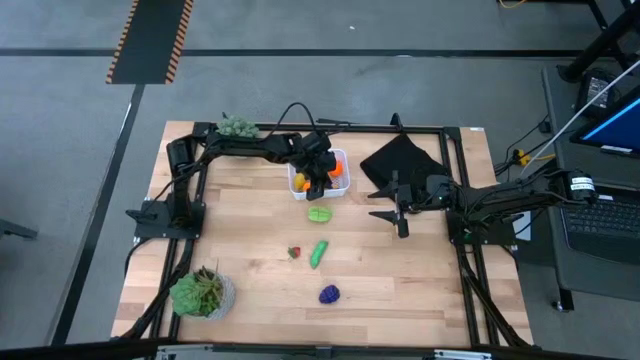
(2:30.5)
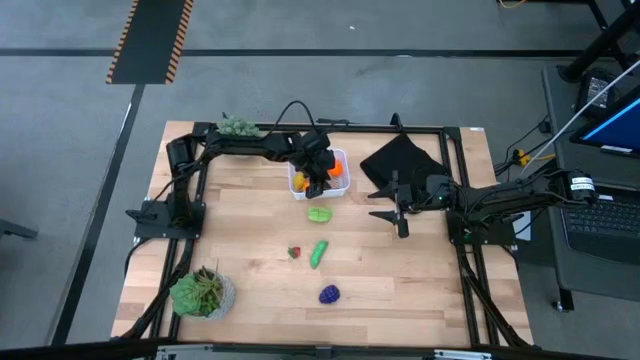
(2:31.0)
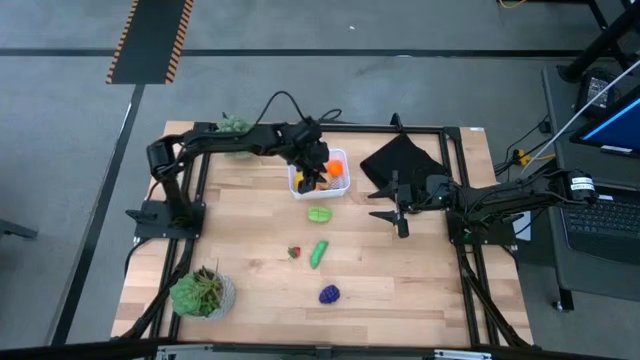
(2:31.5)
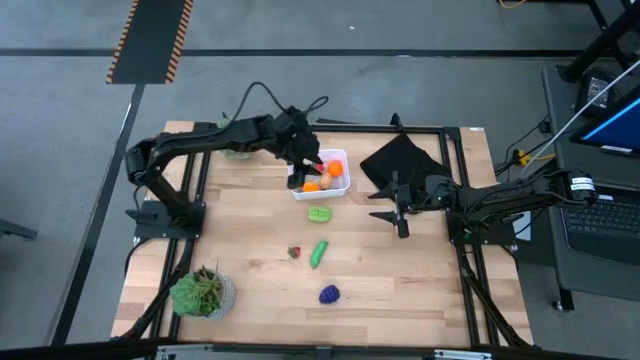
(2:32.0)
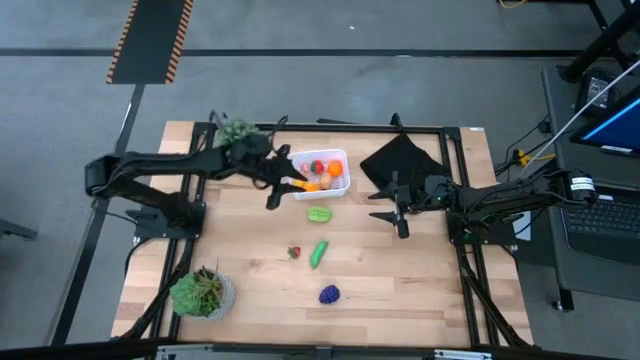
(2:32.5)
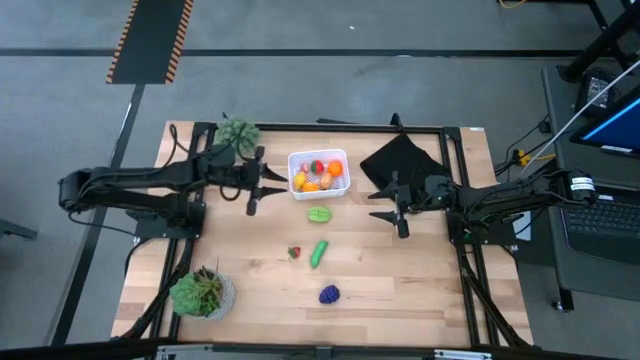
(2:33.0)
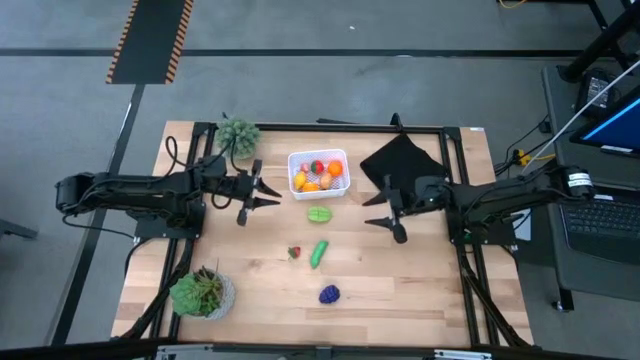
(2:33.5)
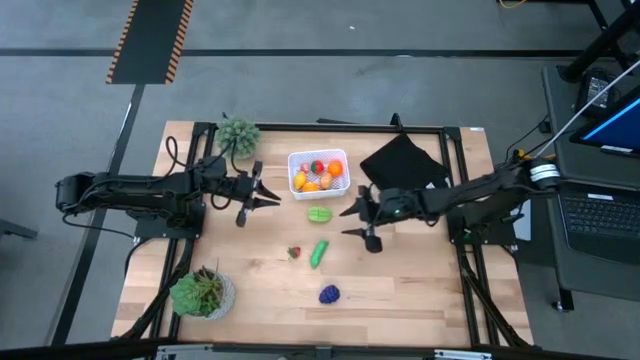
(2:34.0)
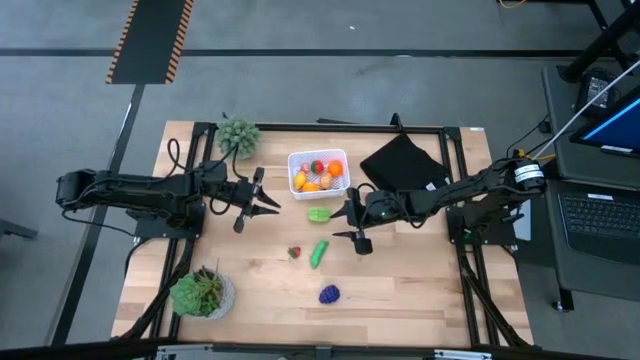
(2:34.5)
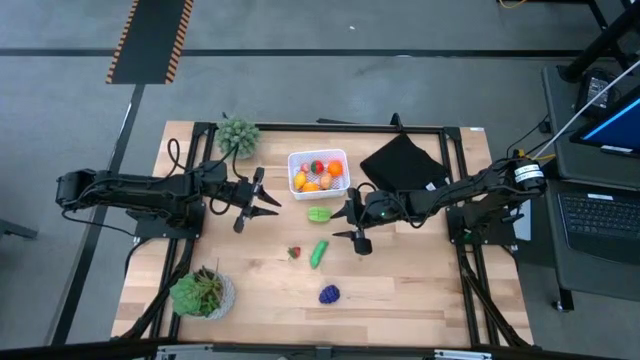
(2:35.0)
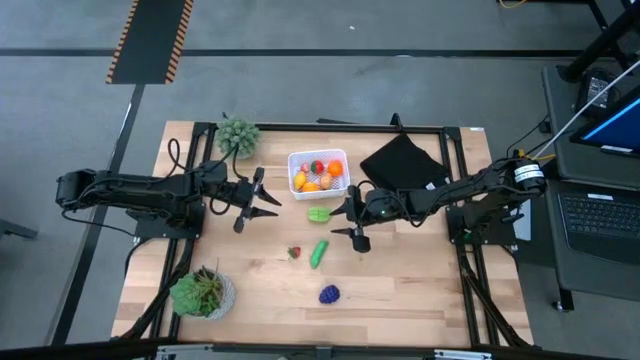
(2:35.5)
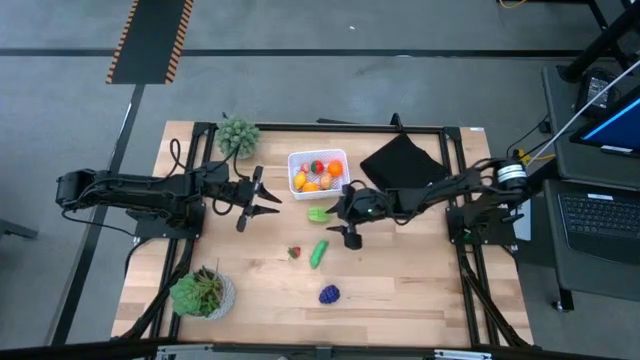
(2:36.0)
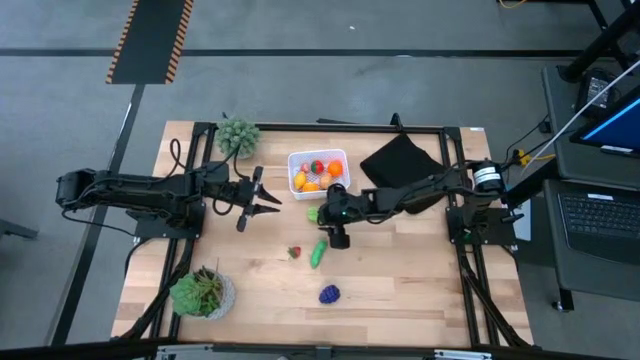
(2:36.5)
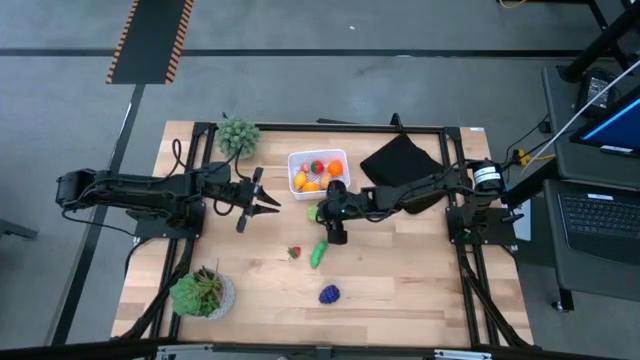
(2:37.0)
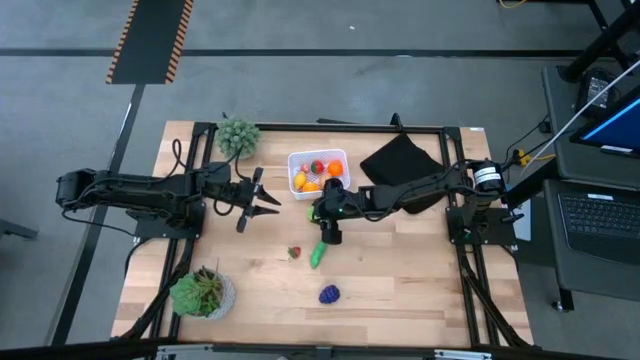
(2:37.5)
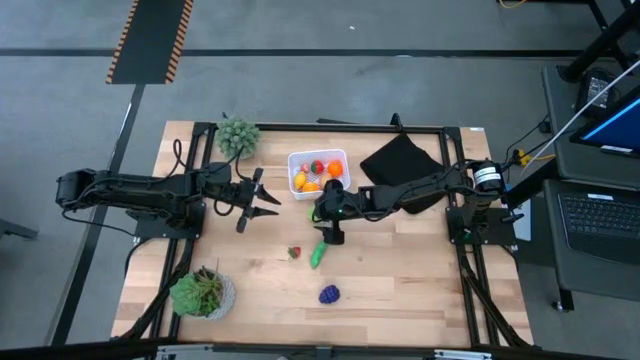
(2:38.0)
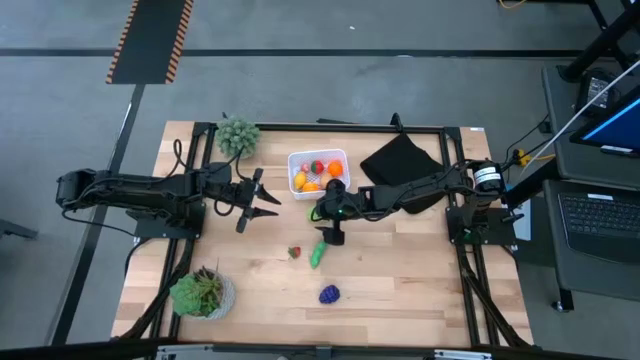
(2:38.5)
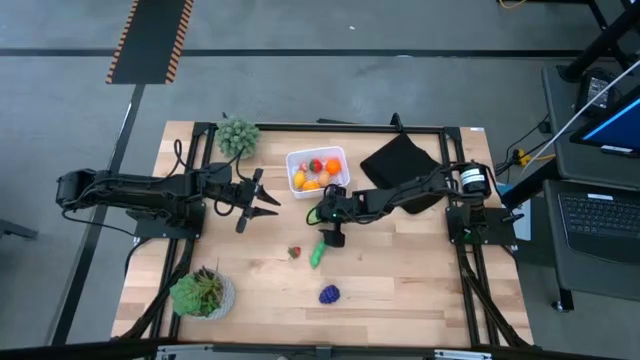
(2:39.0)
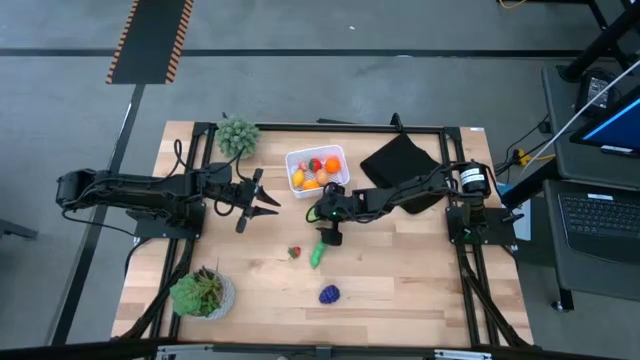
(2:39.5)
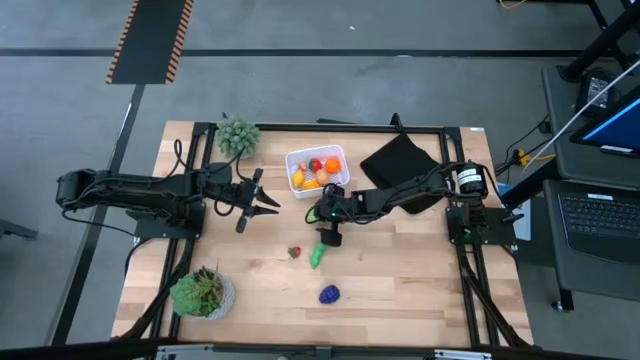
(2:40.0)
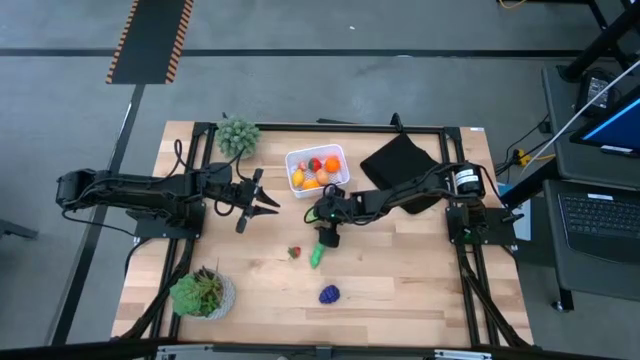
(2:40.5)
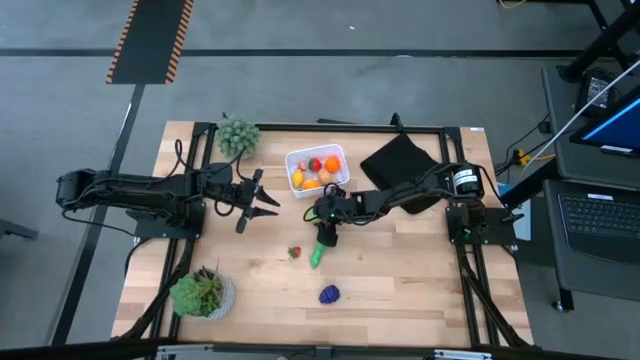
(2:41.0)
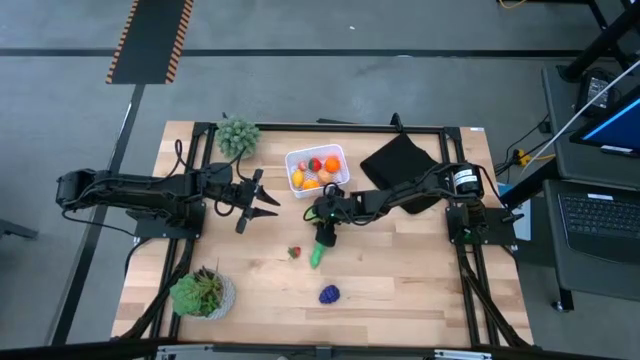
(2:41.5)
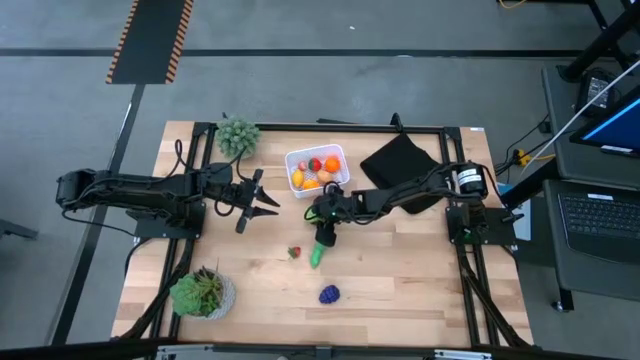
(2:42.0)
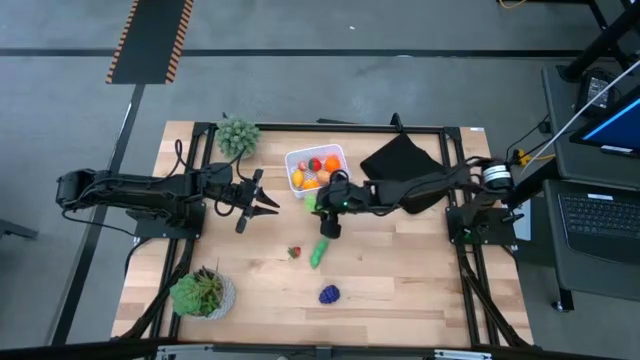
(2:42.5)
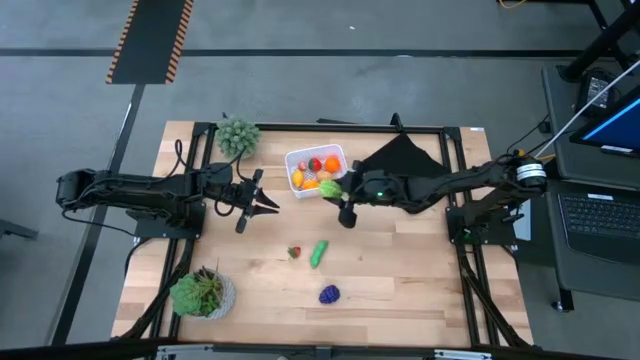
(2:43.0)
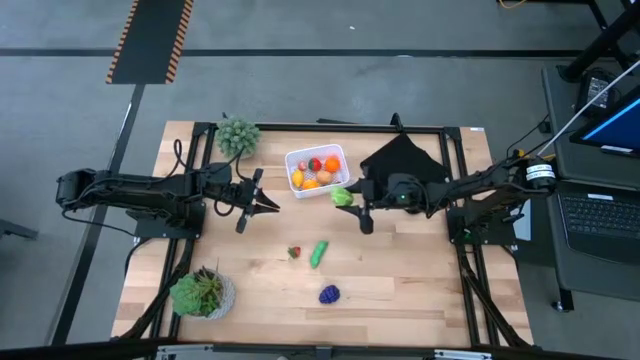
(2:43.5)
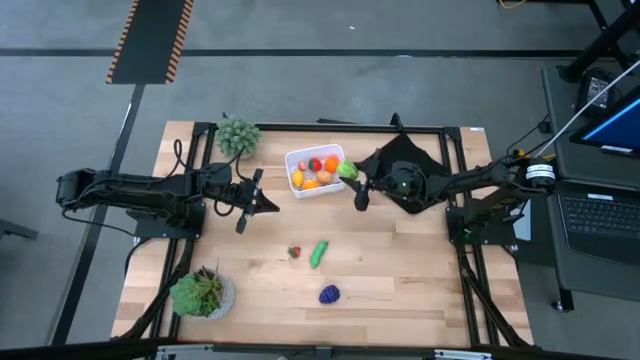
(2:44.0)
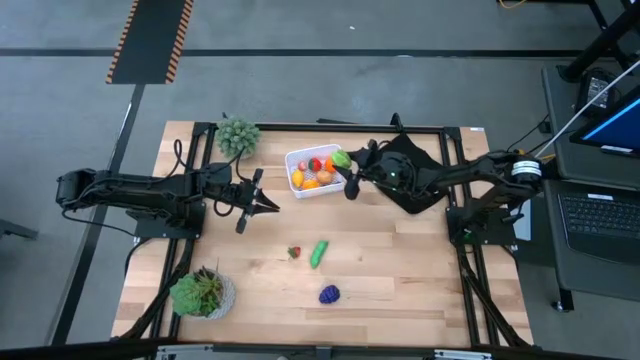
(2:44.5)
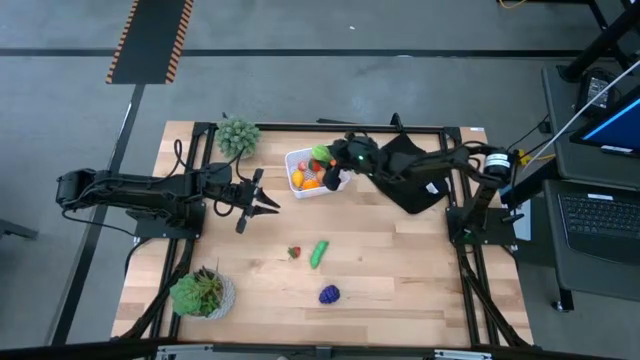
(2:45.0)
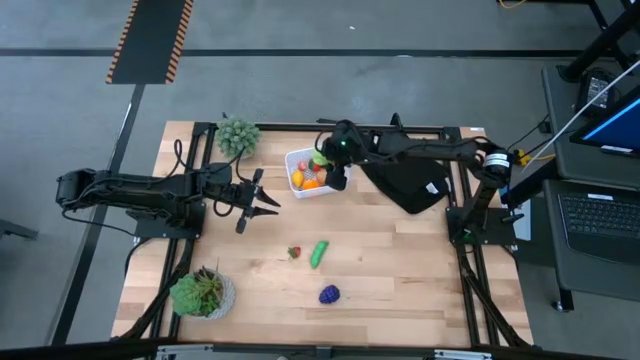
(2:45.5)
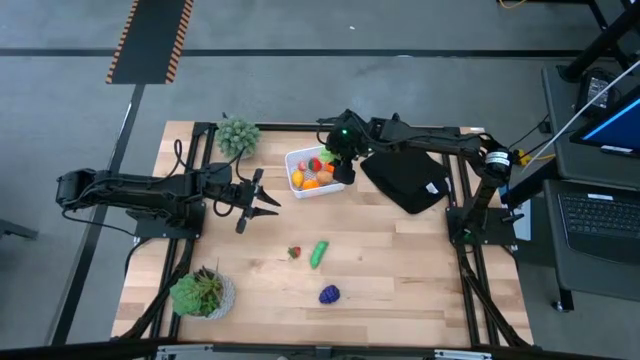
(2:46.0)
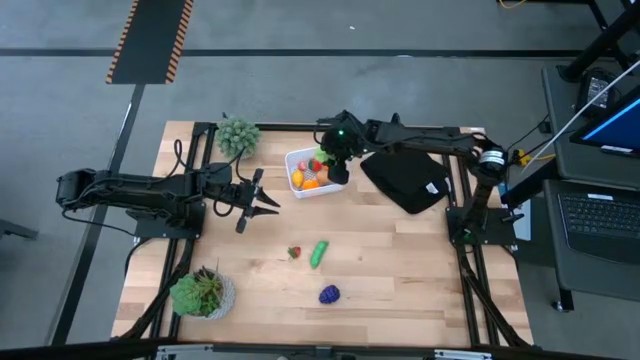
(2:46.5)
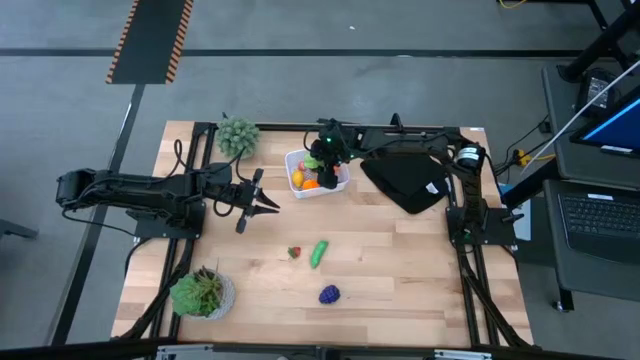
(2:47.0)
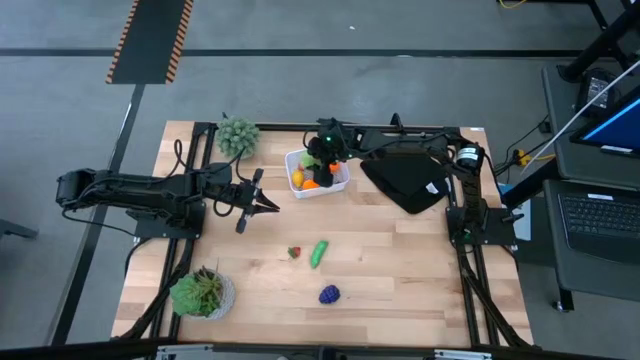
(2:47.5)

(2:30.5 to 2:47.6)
Task: Pick and placing Produce into tupperware
Put the star fruit into the white bin

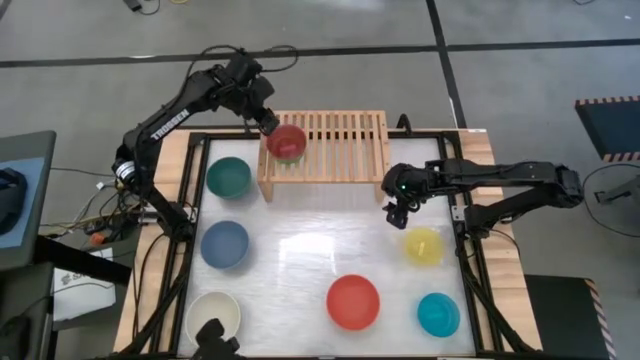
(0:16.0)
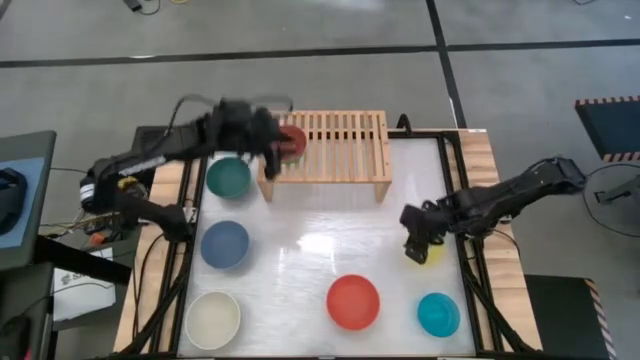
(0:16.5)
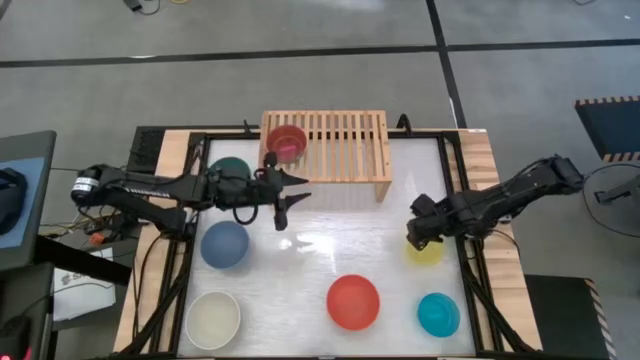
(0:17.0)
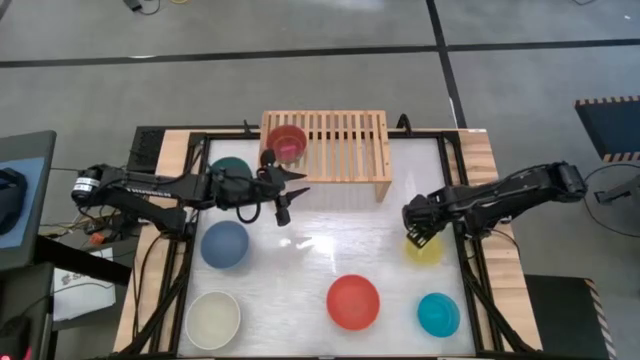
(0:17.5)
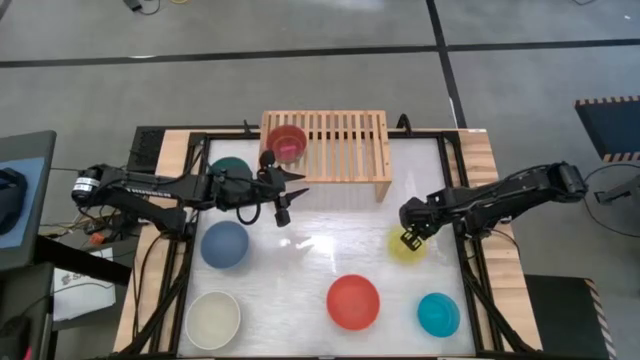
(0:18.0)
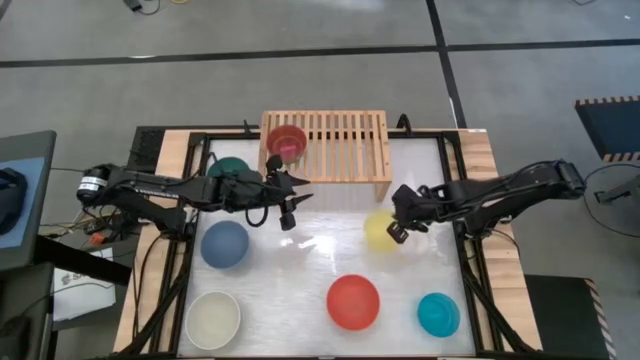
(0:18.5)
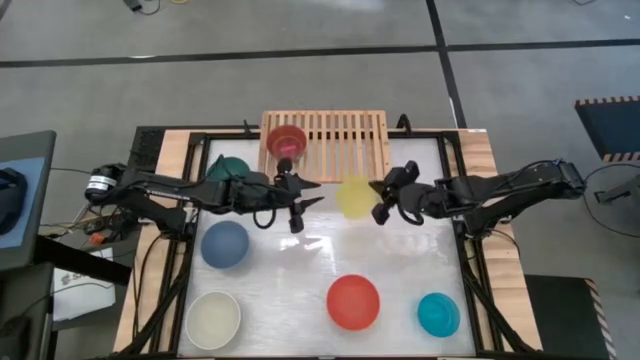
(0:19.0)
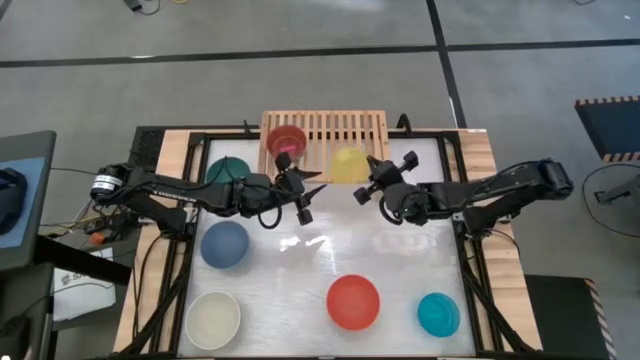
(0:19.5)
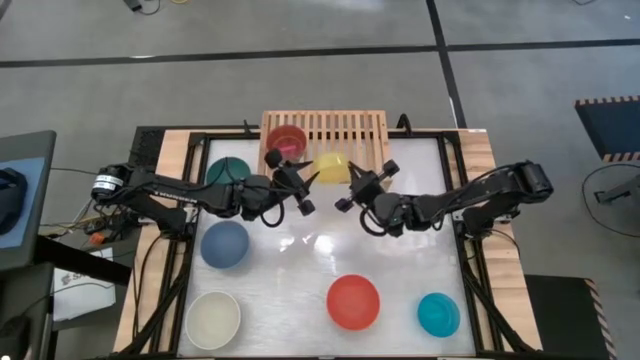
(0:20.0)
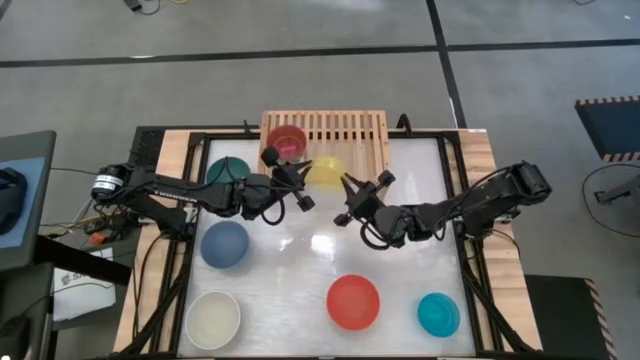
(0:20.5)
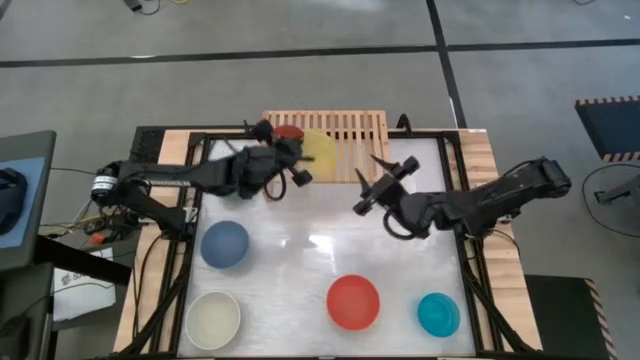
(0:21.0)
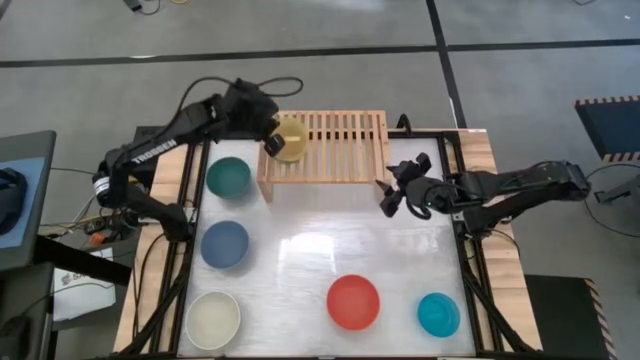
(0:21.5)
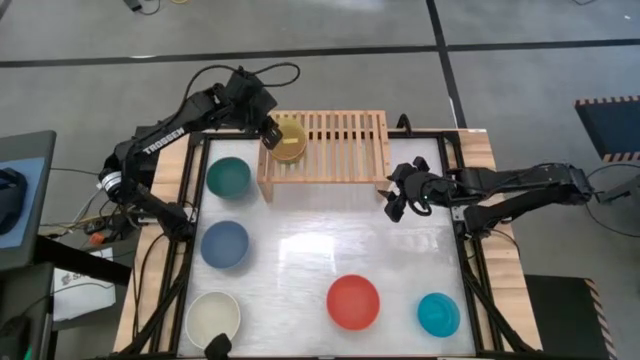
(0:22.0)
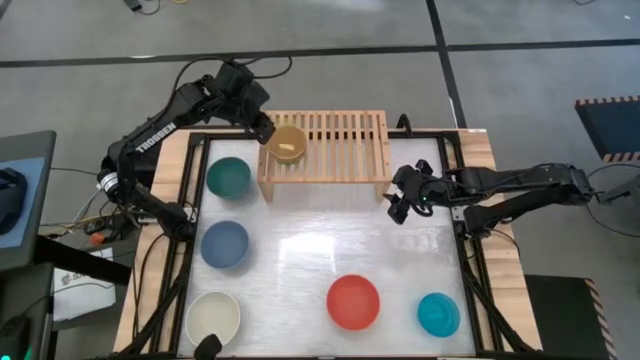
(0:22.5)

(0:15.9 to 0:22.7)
Task: Place and stack bowls onto a shelf
Stack the transparent yellow bowl on top of the transparent red bowl
